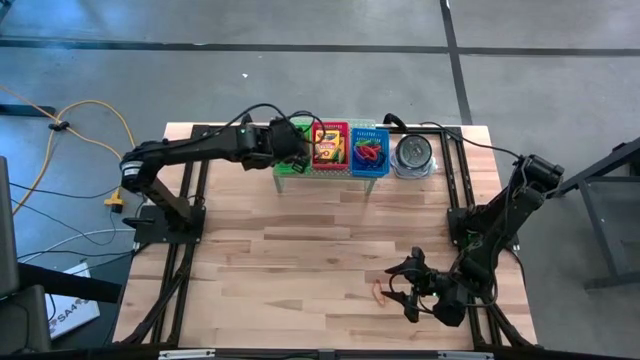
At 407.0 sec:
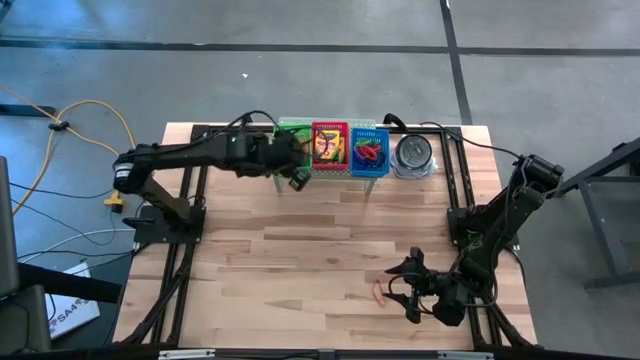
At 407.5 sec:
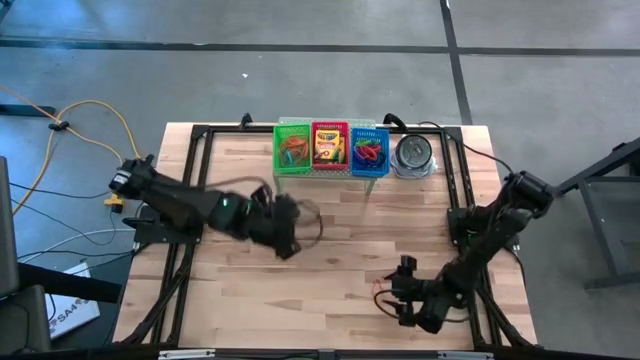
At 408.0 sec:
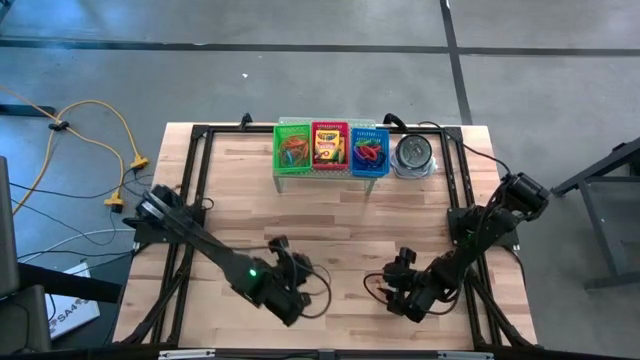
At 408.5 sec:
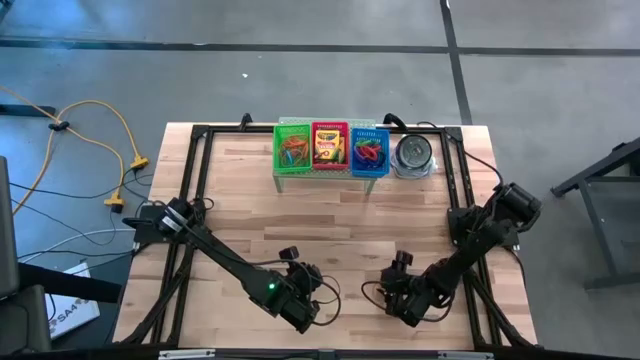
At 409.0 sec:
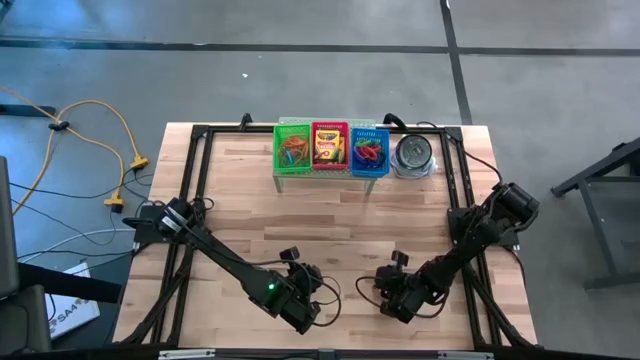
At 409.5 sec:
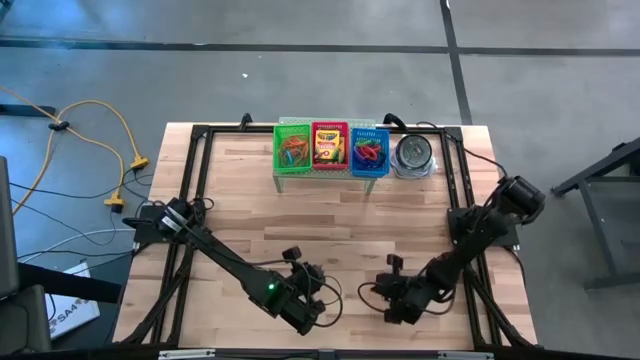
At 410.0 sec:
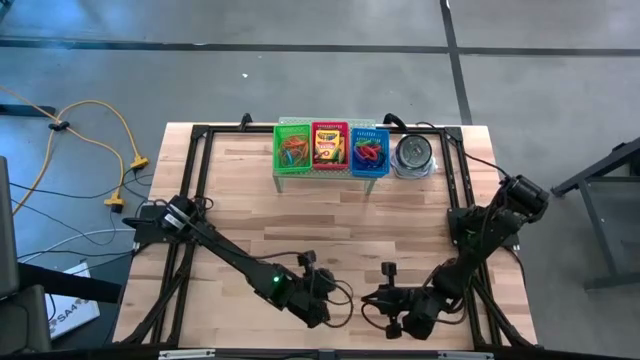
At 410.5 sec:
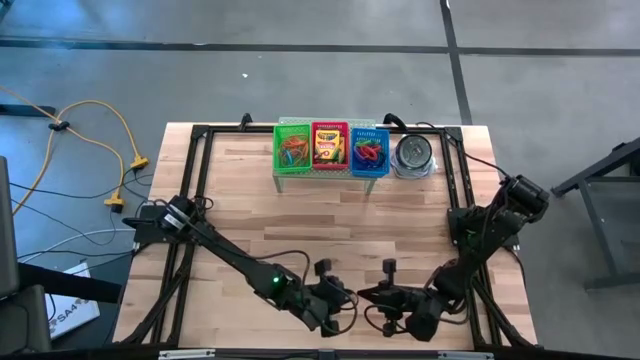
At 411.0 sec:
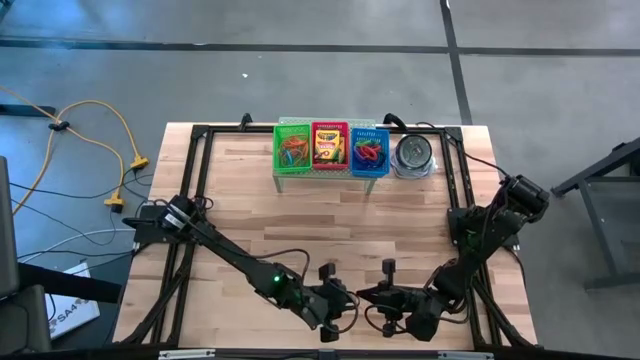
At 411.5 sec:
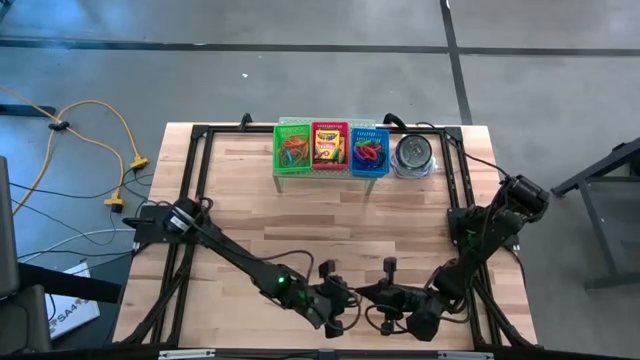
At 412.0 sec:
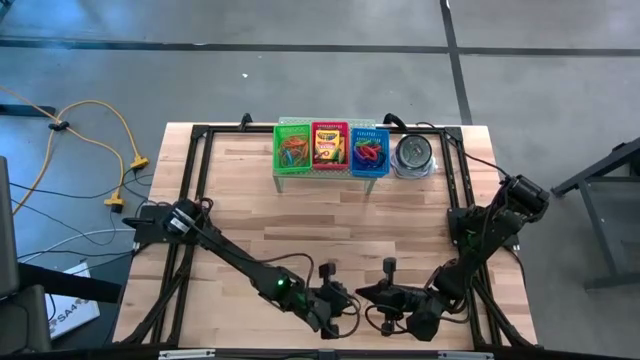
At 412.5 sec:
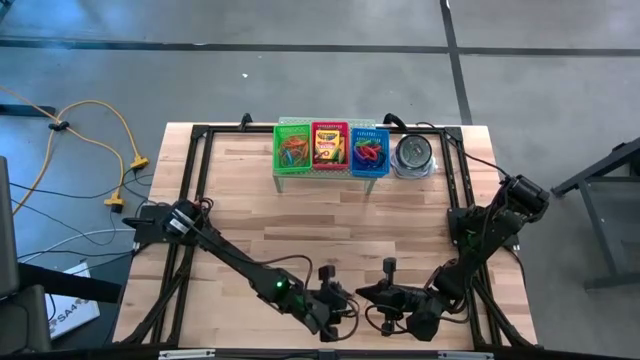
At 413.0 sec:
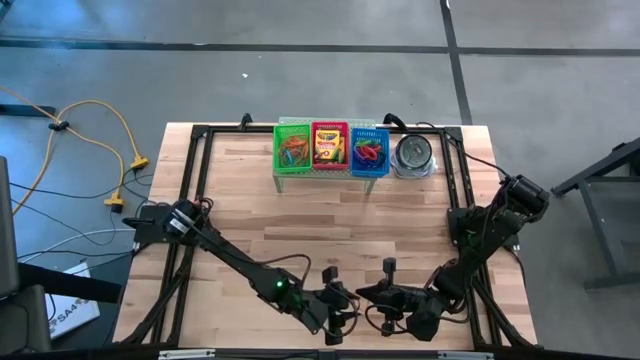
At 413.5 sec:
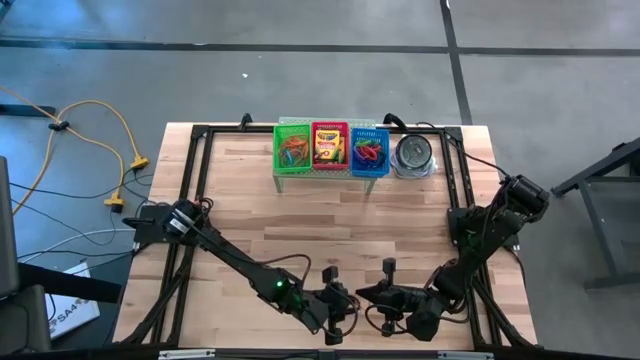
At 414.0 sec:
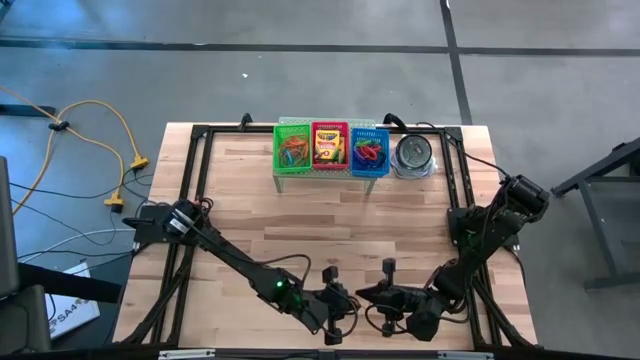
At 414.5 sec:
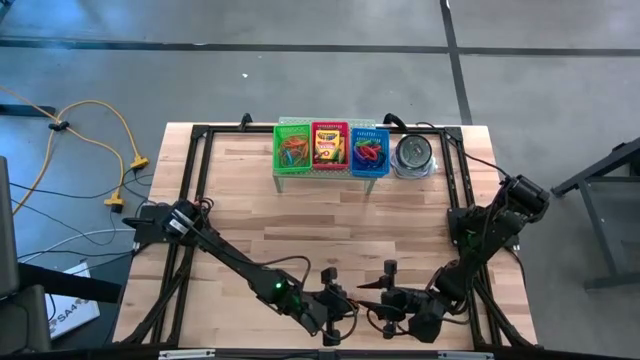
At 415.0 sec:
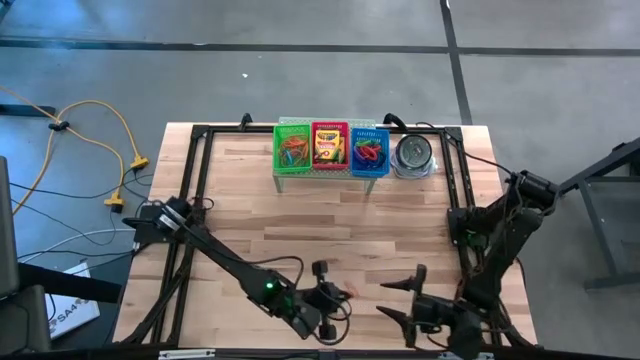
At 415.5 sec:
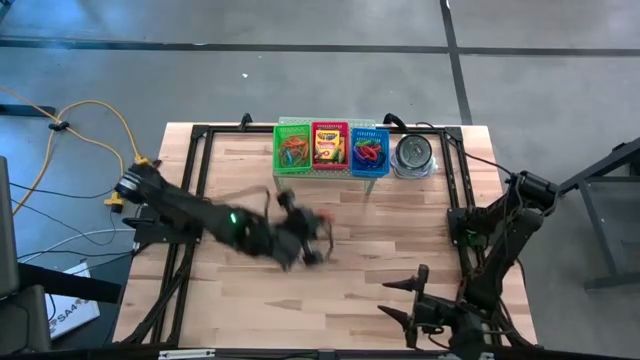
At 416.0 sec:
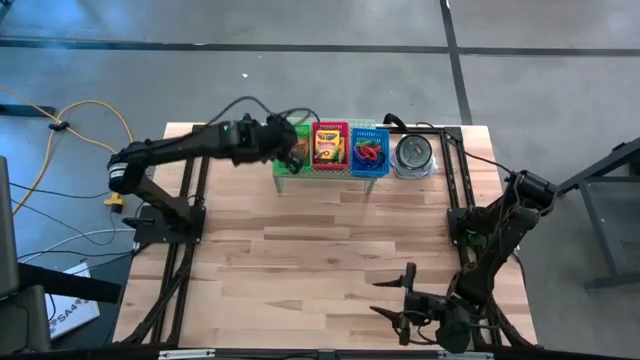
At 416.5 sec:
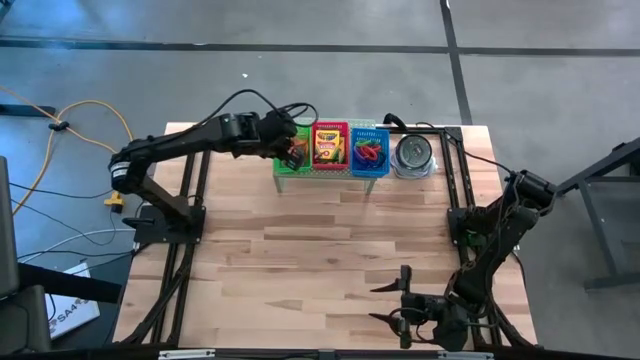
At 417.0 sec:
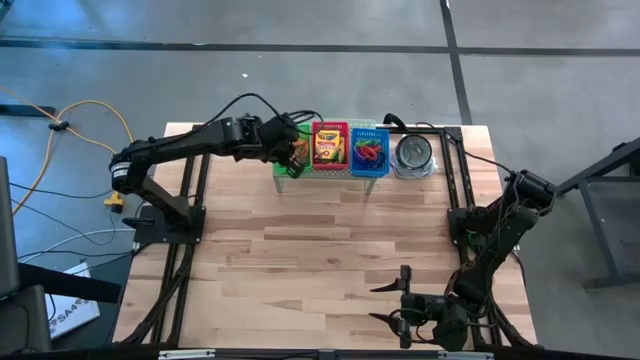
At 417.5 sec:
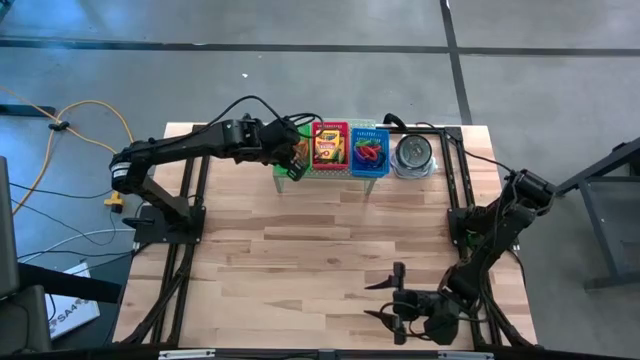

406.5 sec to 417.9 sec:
Task: Pick & Place Office Desk Supplies
Put the orange rubber band into the green bin on the shelf

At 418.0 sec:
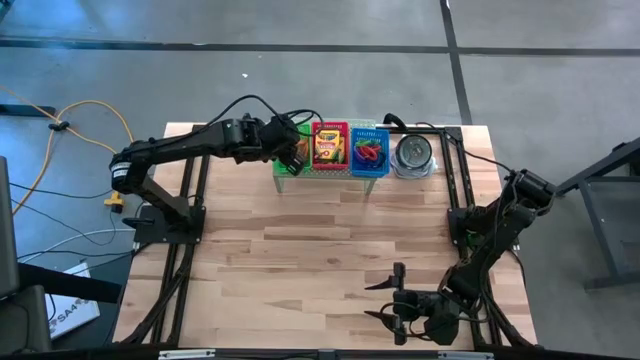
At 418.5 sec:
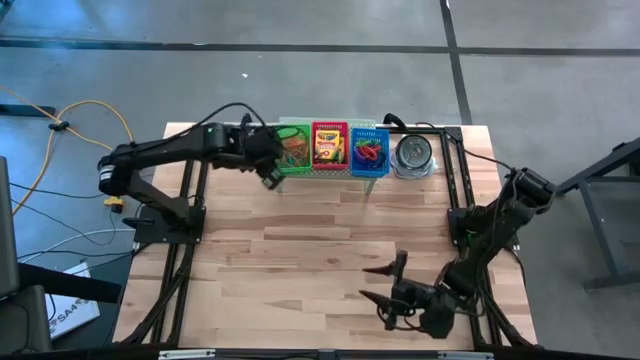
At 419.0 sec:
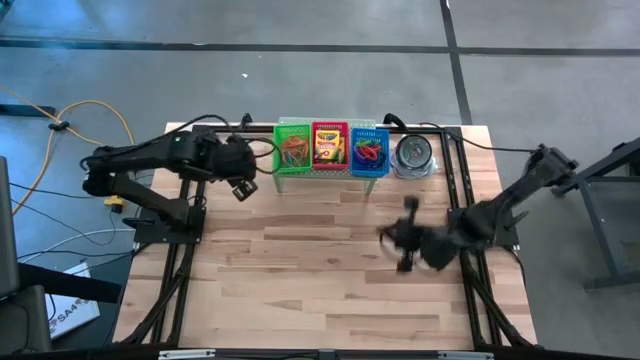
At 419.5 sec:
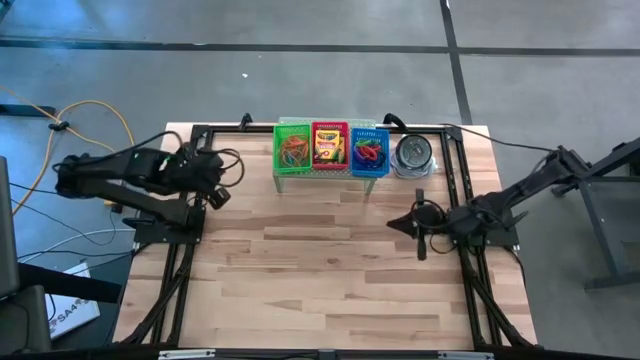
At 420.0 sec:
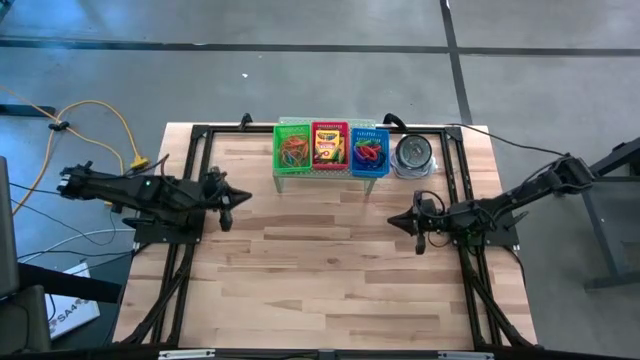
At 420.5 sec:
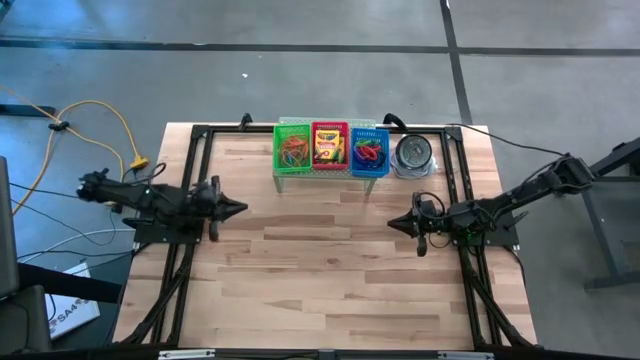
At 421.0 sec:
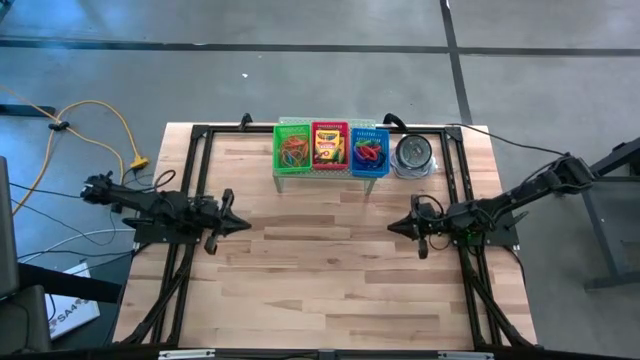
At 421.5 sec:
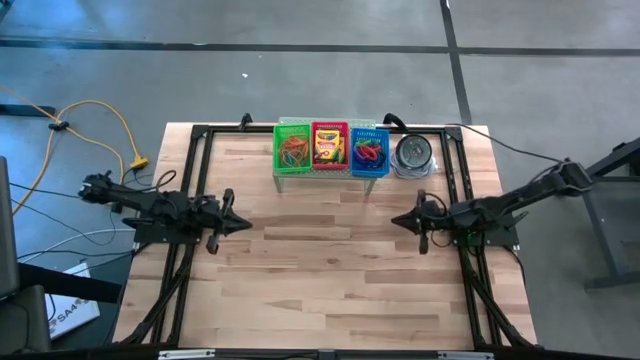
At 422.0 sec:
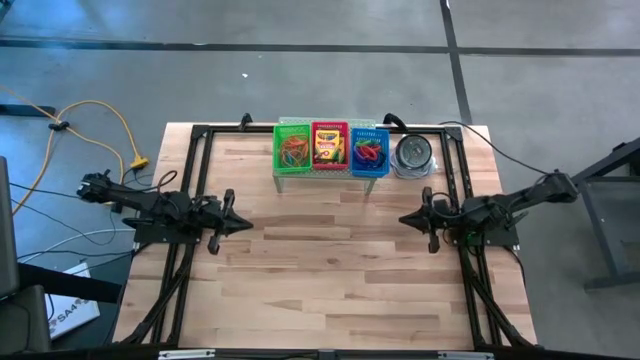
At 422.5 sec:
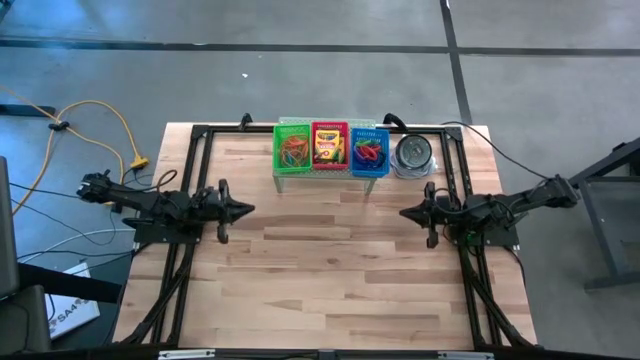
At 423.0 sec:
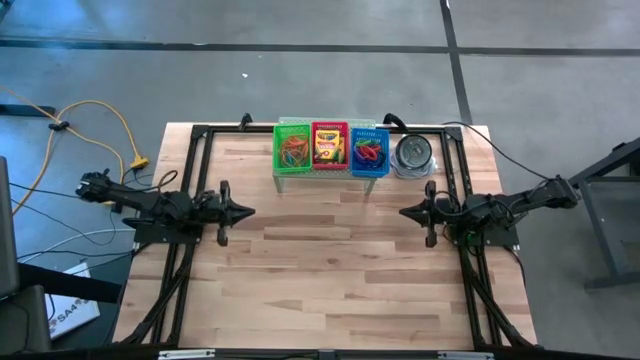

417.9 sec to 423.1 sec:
Return to Home Position
